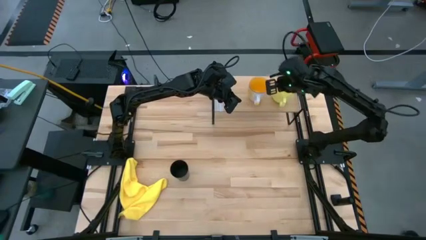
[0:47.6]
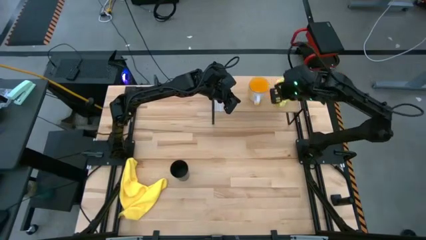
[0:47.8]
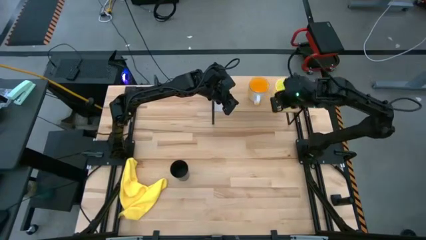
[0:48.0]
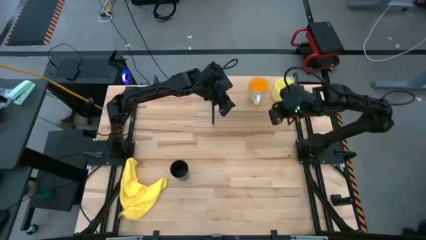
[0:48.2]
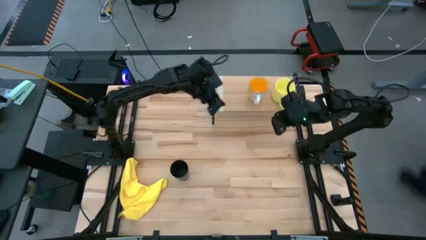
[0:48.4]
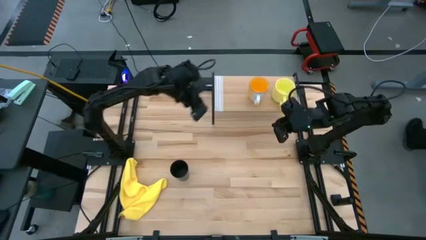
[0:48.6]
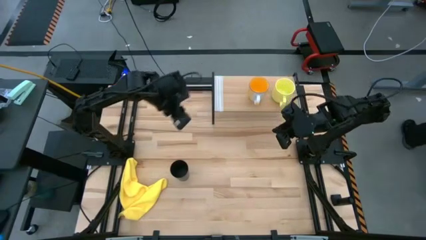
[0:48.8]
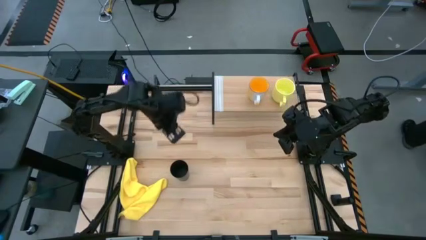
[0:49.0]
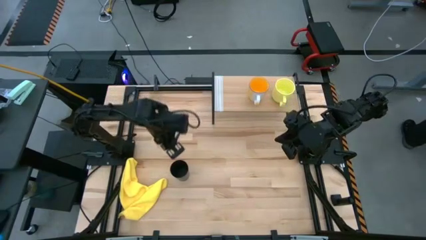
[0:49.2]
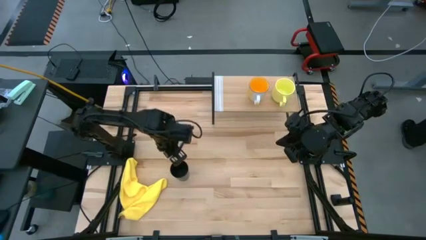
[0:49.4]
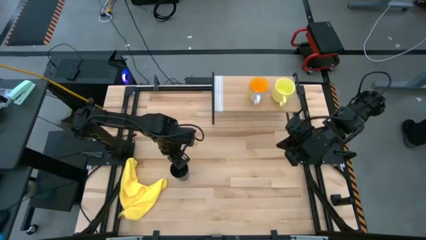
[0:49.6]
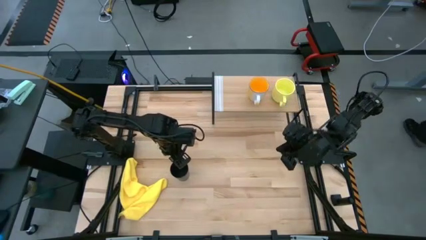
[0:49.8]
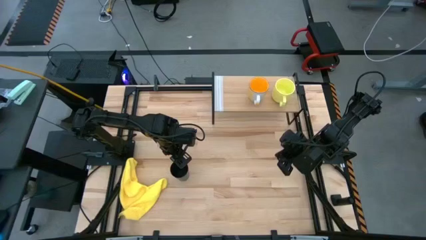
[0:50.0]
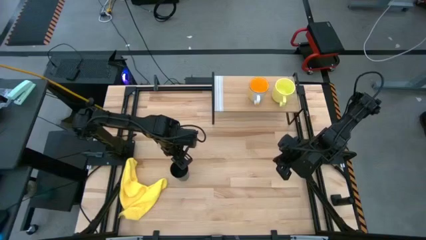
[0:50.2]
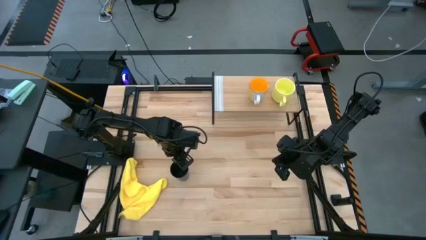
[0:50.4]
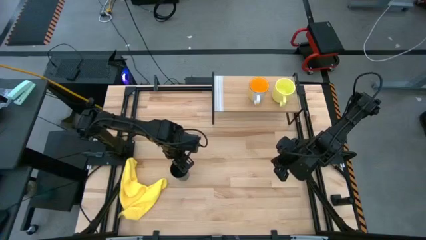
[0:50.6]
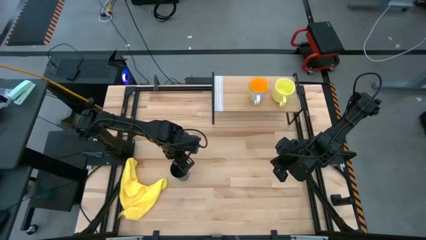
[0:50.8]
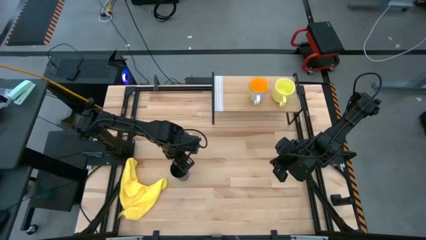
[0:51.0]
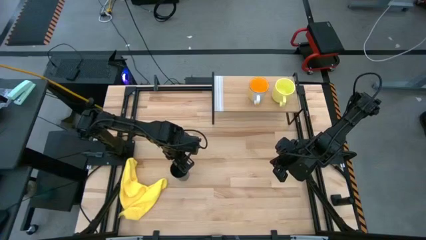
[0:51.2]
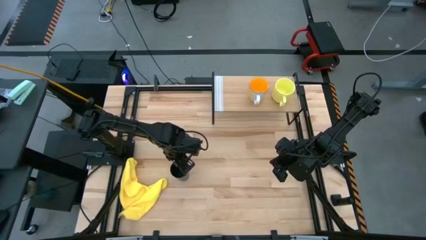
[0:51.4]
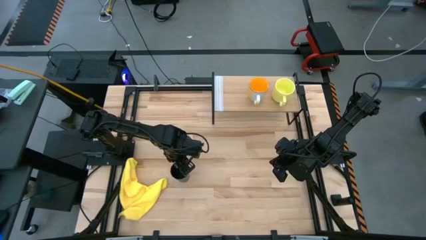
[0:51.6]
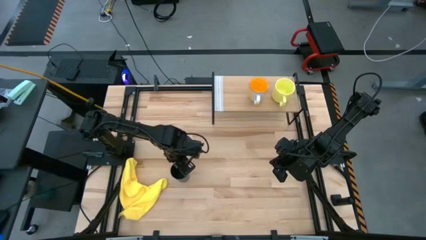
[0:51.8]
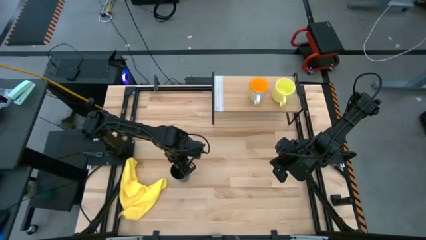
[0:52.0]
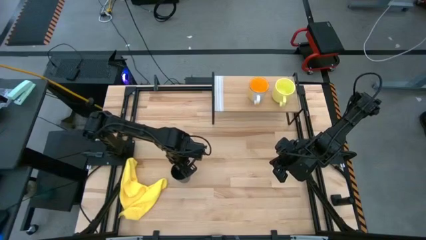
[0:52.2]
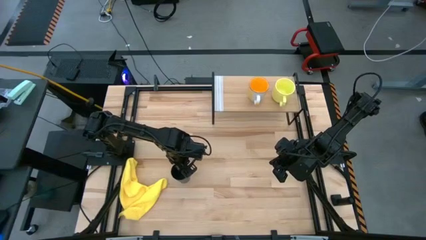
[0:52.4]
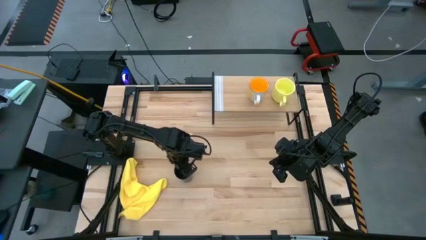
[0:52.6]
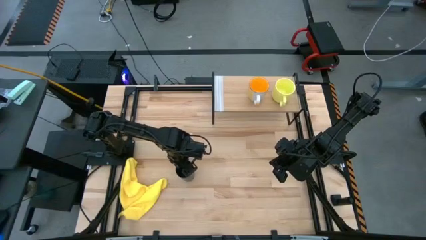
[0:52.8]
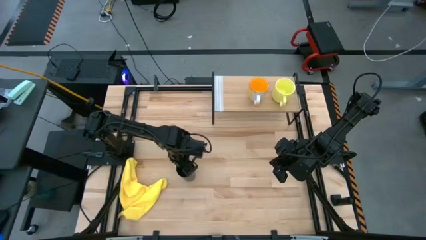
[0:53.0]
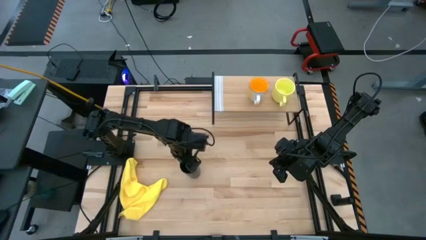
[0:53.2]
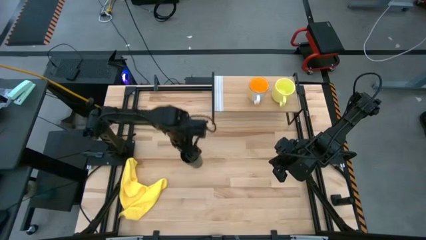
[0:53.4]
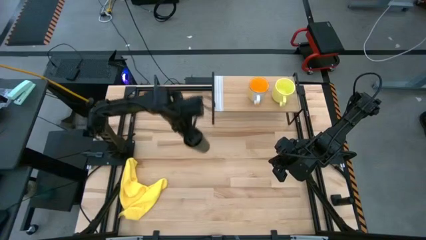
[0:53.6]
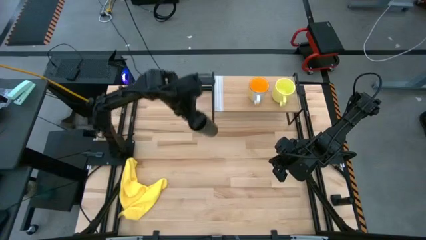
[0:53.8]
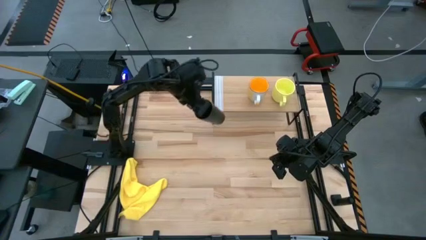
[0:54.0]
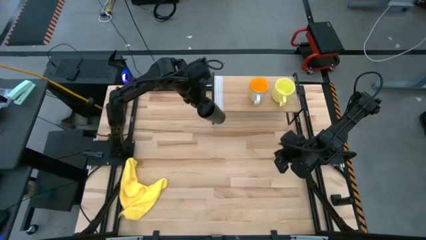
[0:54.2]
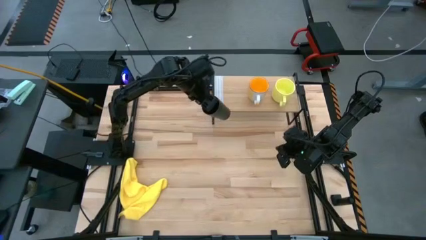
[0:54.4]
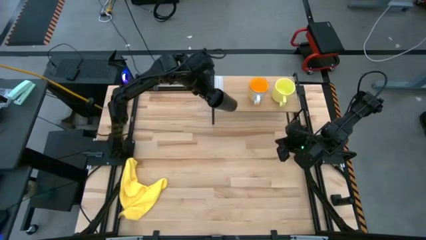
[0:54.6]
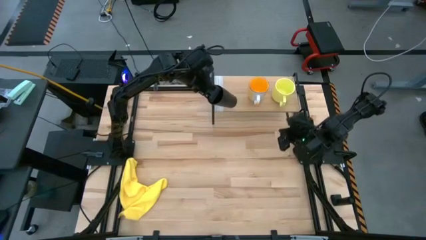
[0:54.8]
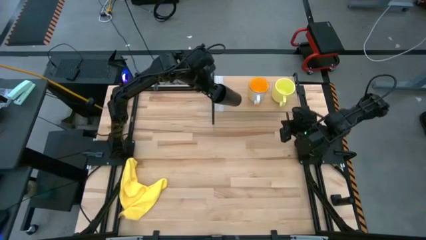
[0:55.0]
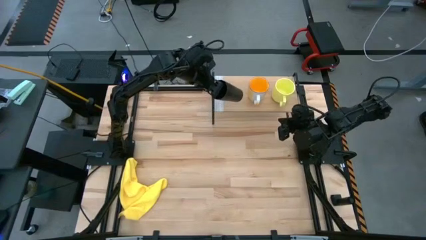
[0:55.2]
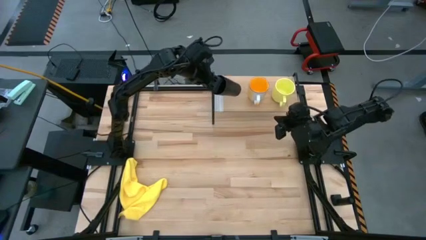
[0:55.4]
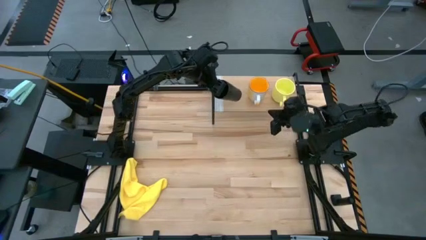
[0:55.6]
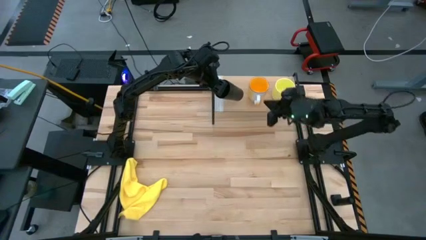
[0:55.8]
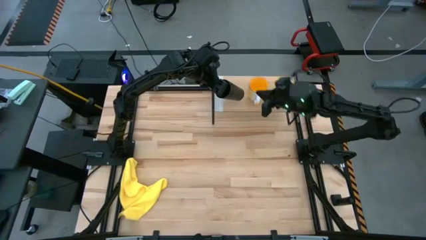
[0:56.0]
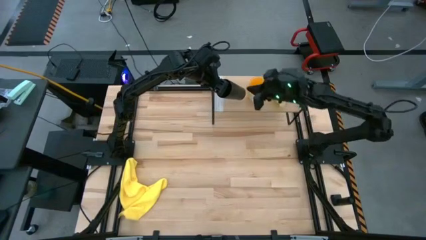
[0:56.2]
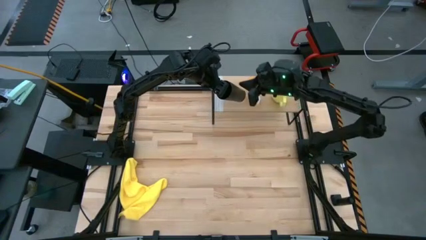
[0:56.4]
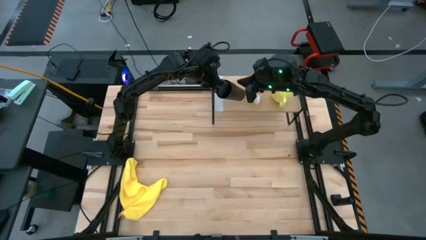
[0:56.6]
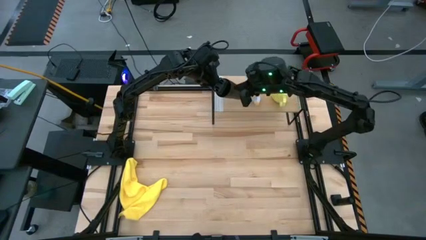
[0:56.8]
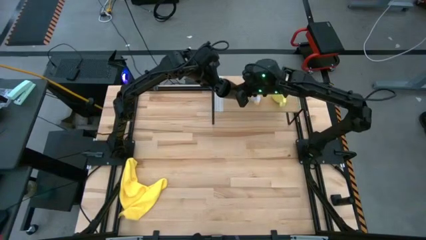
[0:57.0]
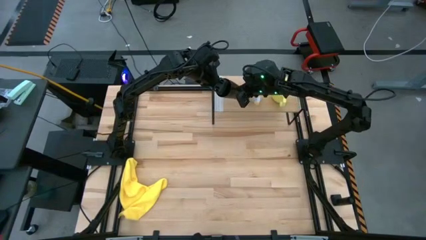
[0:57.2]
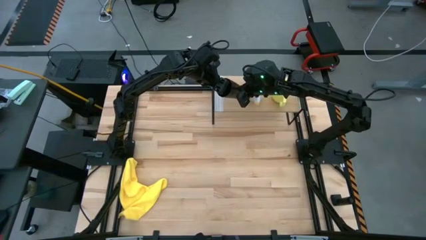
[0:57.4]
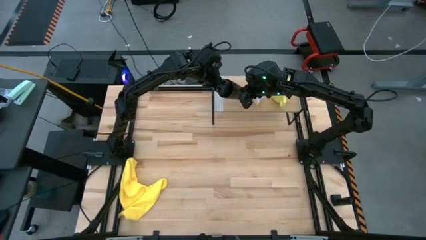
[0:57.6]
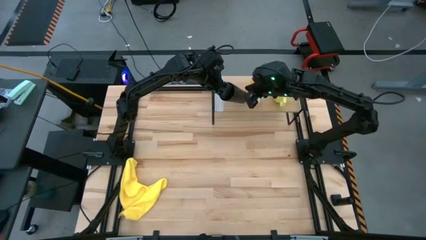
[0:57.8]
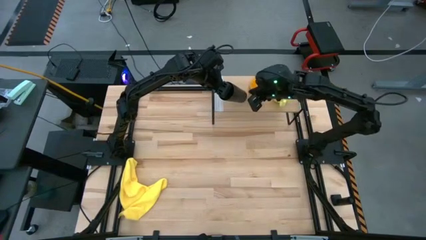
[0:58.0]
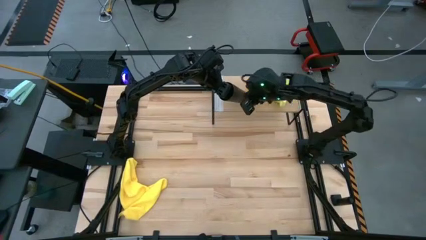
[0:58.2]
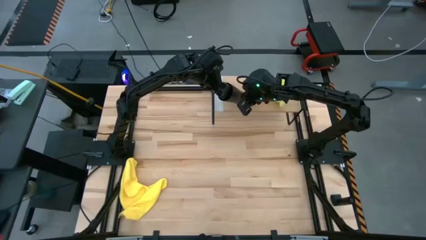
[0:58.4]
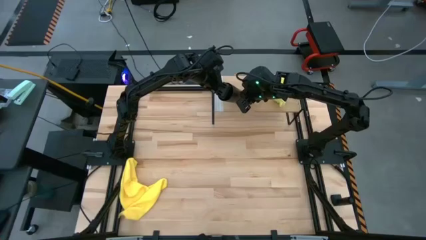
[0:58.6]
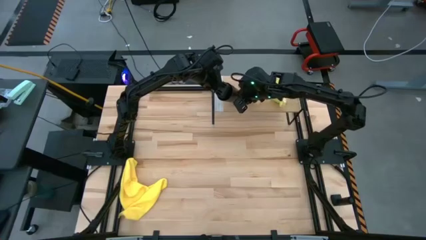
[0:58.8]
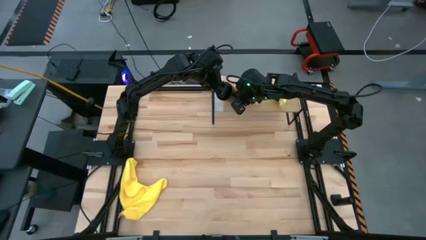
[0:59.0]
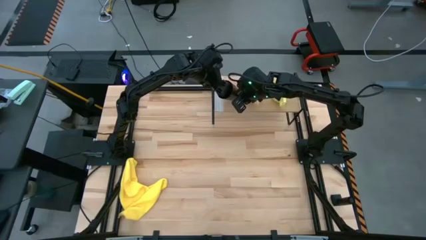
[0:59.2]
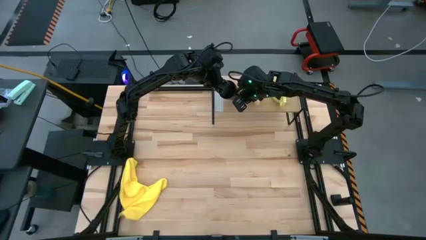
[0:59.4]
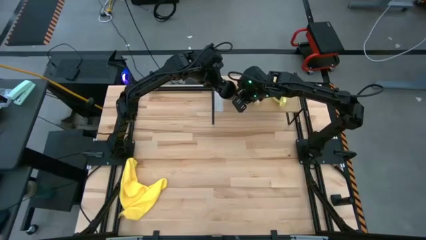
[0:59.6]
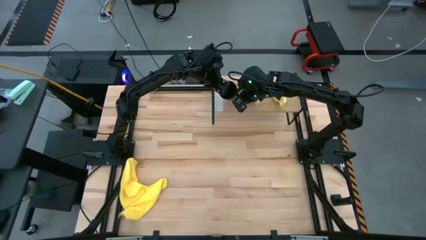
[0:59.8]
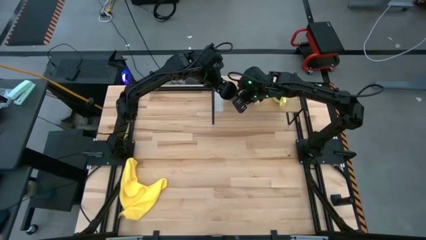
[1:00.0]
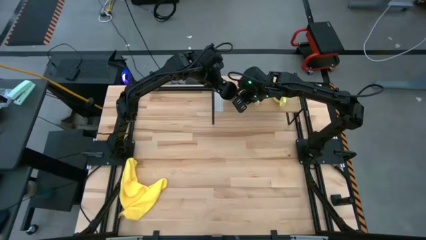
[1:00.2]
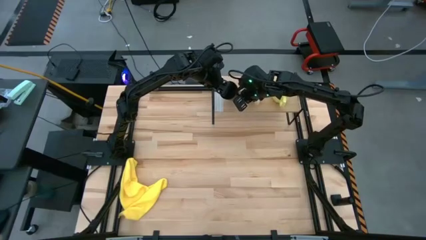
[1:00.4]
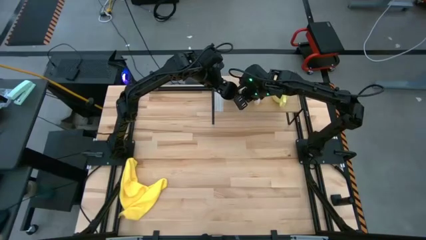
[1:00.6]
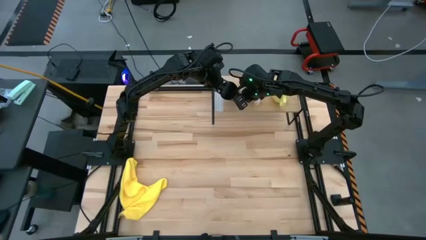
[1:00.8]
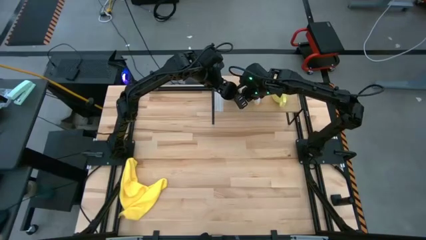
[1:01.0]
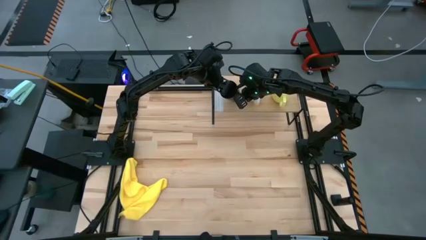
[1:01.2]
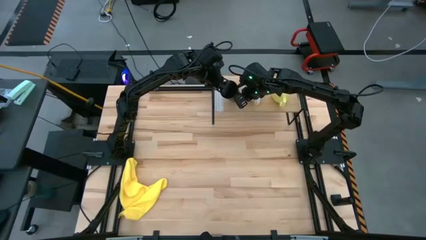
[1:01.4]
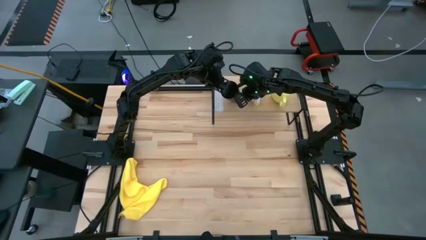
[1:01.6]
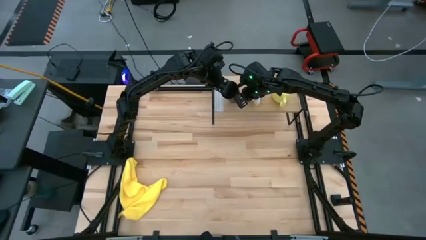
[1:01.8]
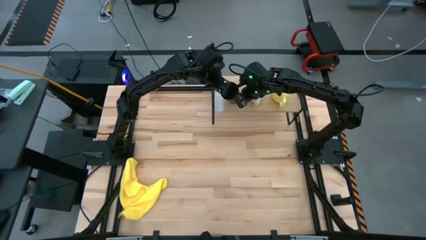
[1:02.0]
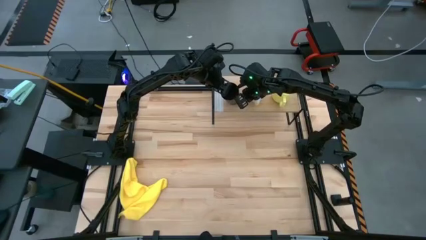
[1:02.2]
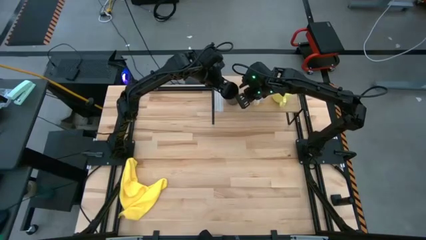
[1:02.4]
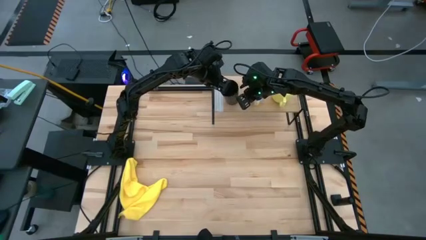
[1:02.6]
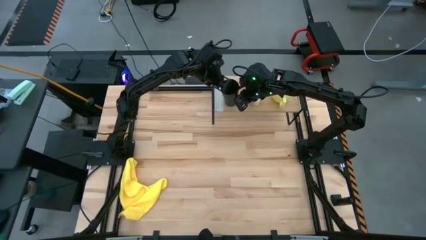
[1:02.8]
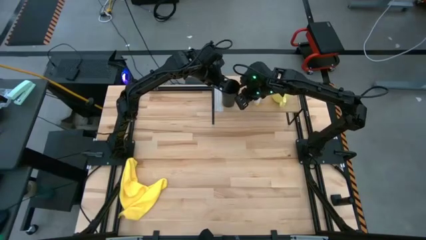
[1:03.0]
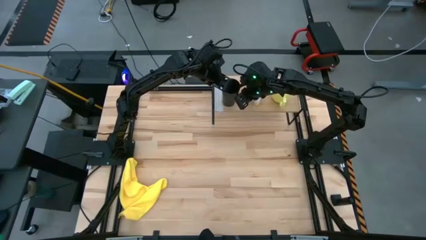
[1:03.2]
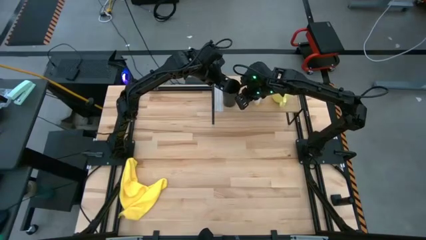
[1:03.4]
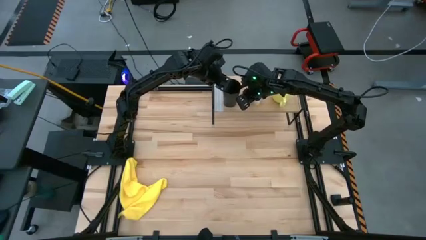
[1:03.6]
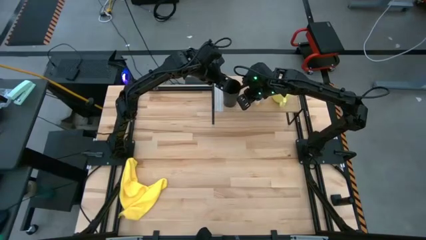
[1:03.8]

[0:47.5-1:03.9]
Task: Stack small to large cups/mugs on shelf
Put the black cup on the shelf
